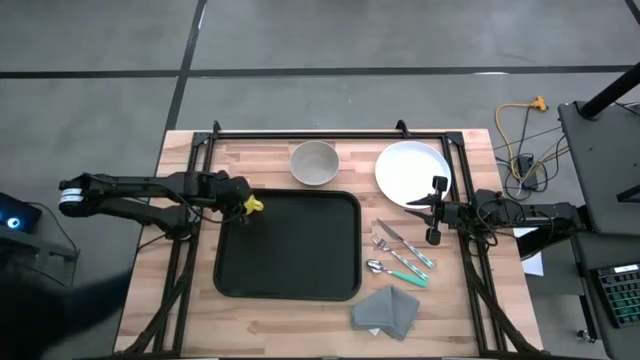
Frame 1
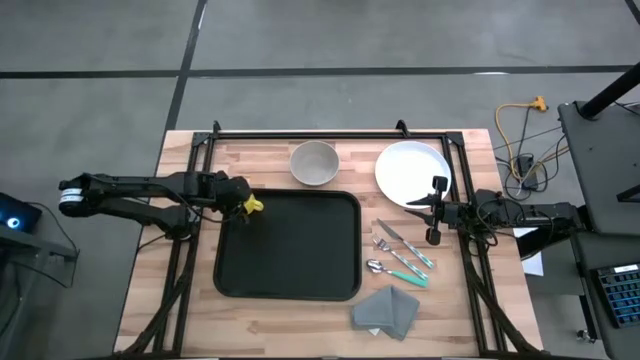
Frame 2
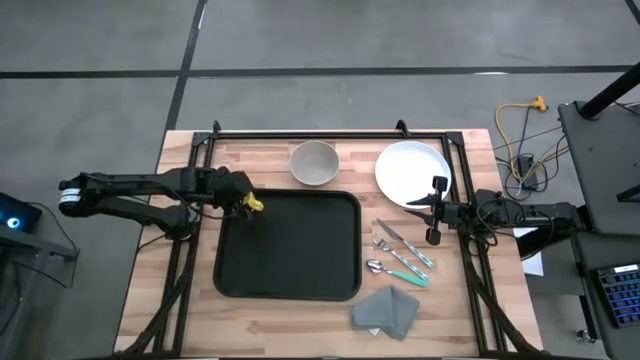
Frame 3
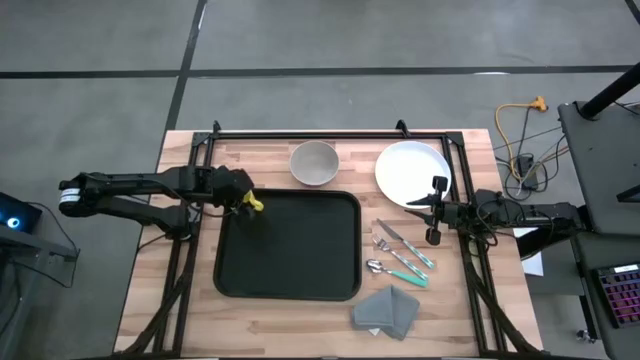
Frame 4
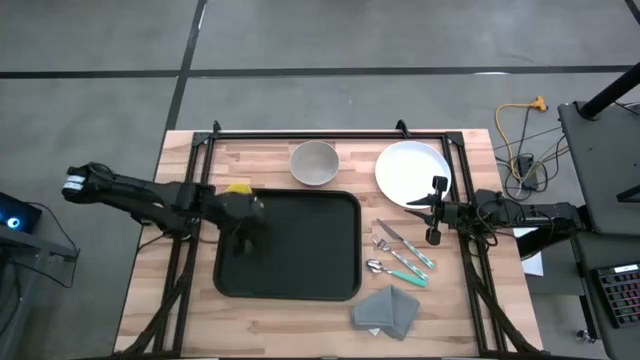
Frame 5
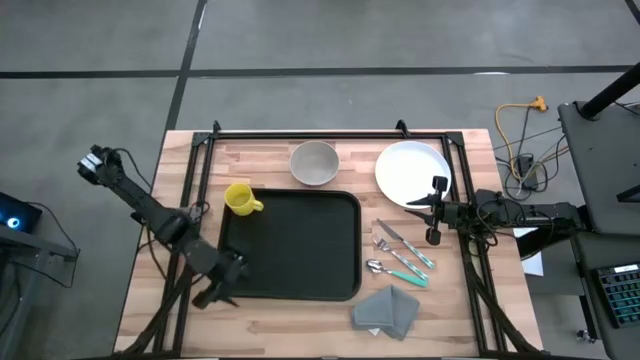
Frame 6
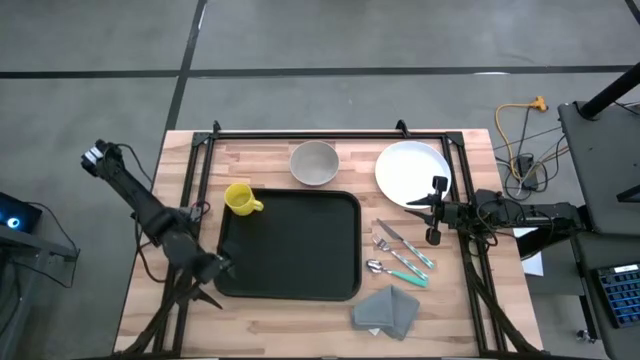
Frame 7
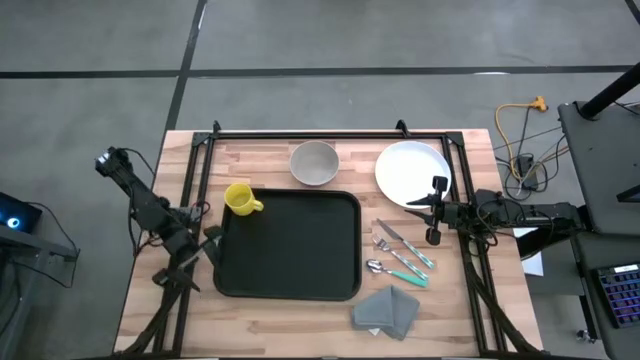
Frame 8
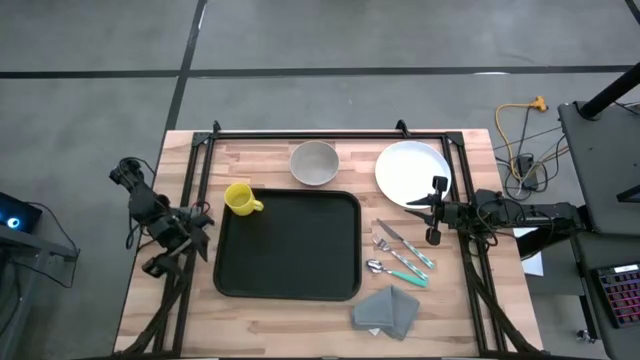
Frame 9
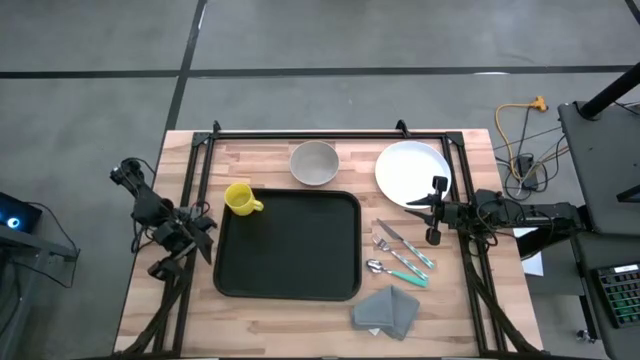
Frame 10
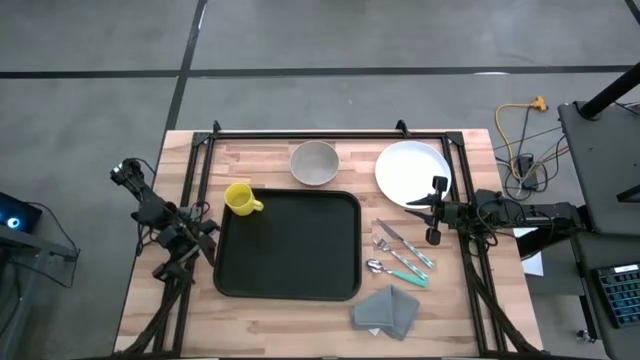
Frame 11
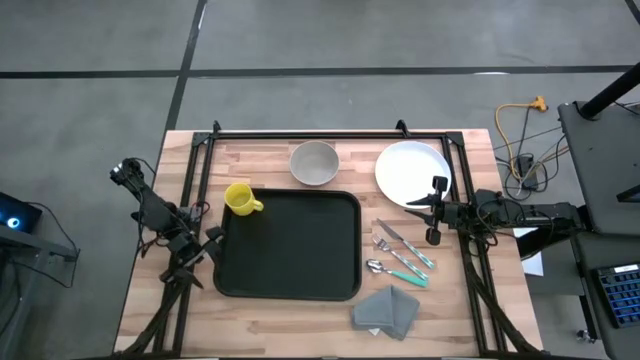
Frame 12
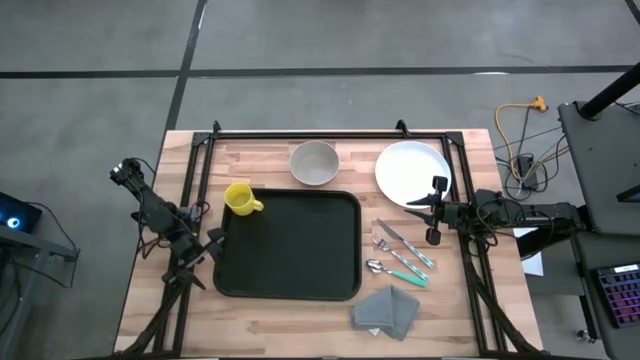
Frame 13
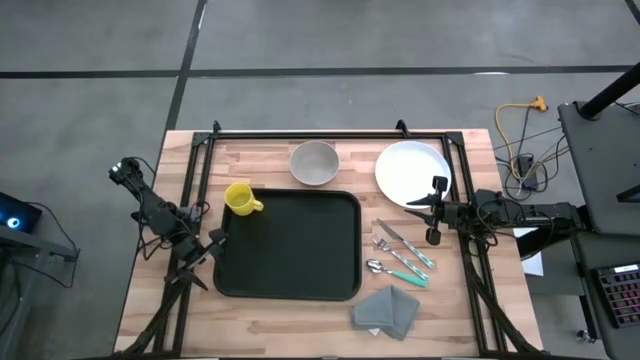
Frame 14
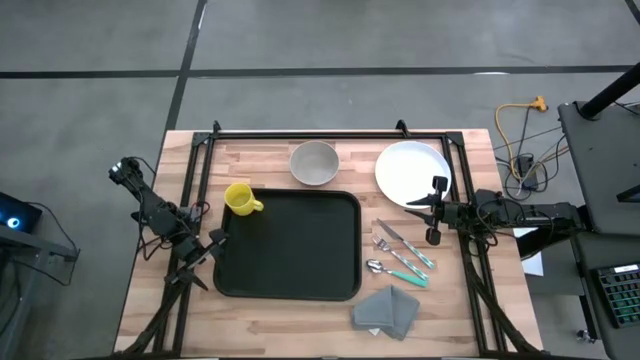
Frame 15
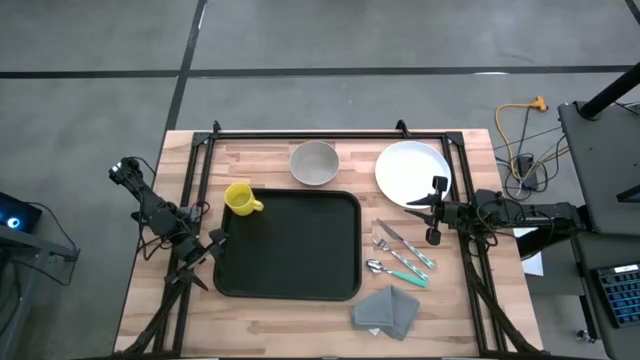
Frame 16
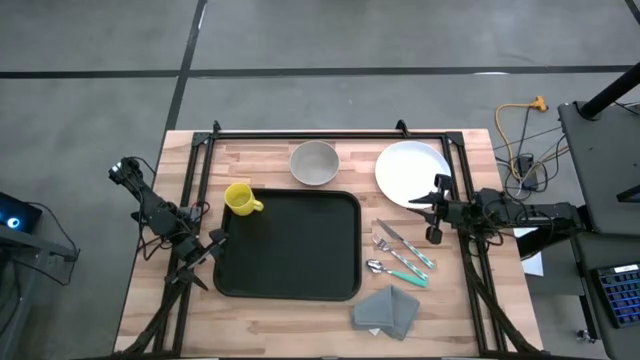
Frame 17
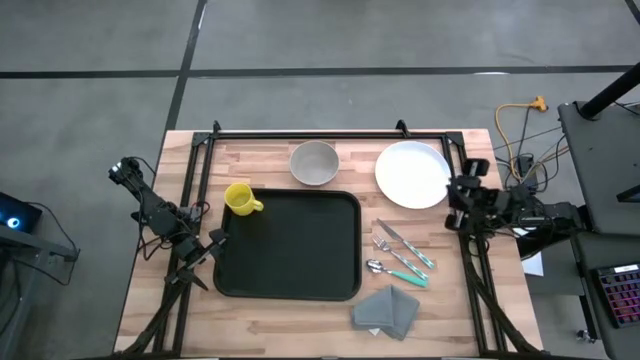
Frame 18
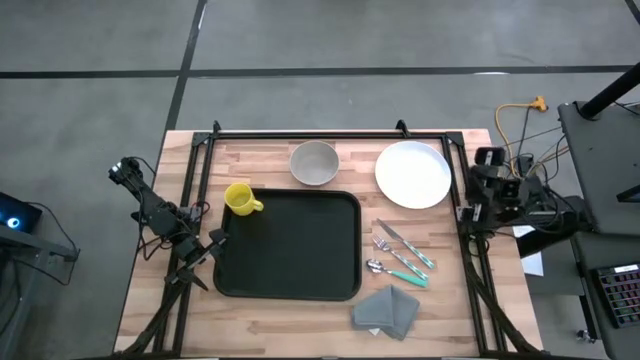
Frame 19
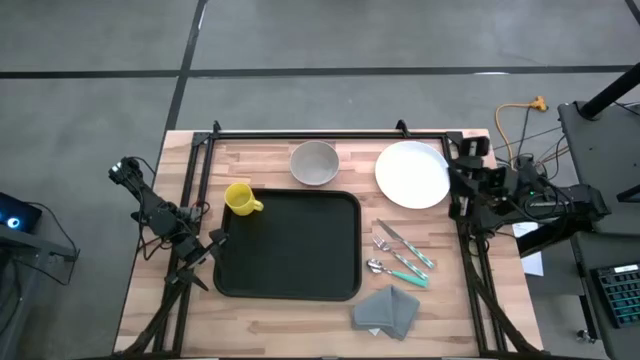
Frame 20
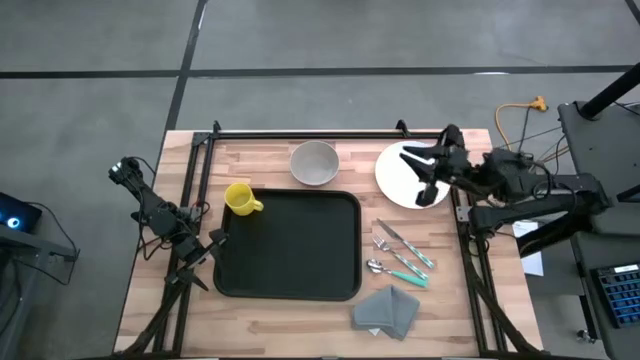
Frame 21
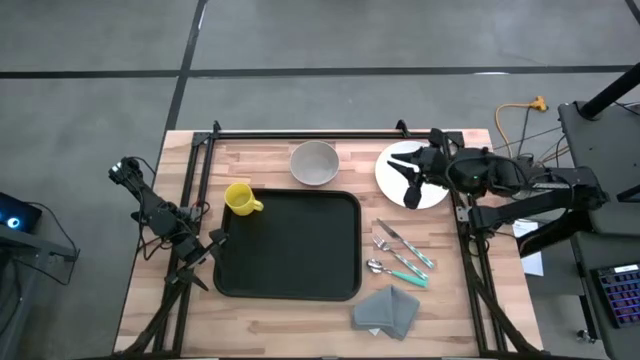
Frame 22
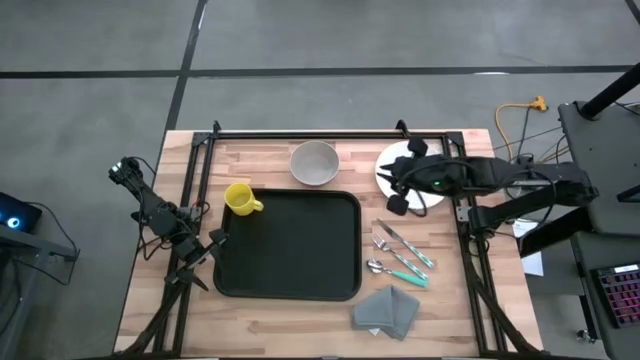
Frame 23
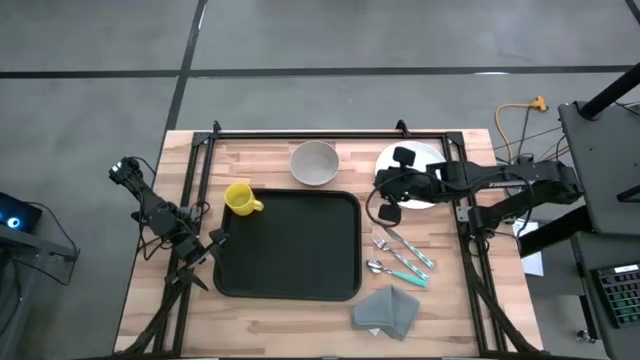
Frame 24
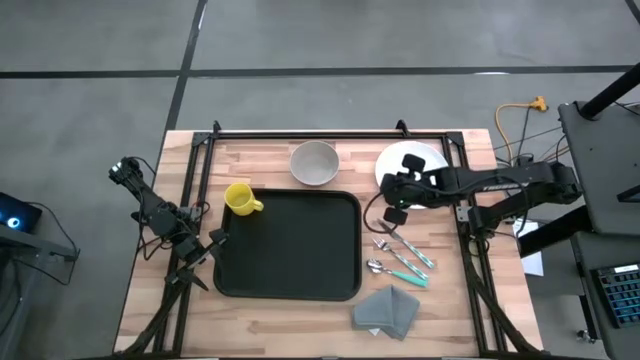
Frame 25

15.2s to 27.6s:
Task: Set up tray
Put the white plate on the black serving tray below the yellow cup

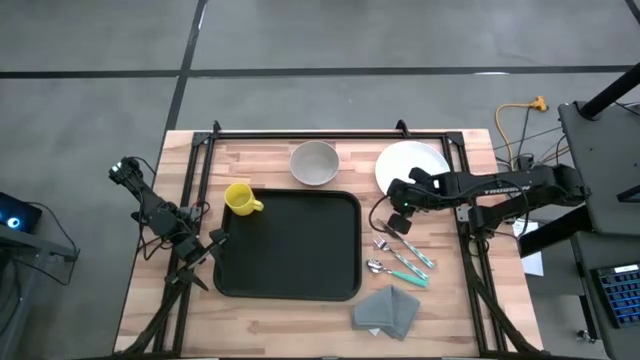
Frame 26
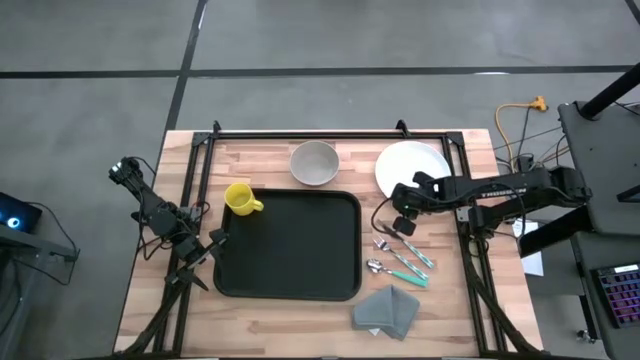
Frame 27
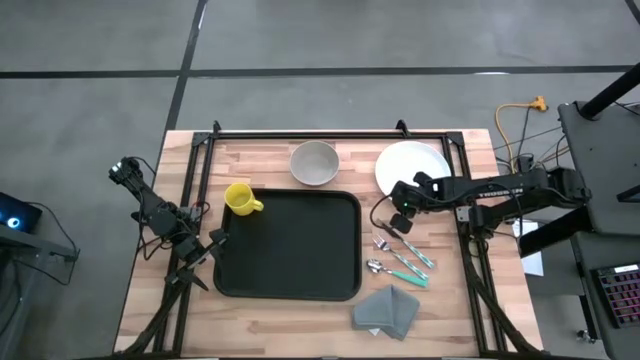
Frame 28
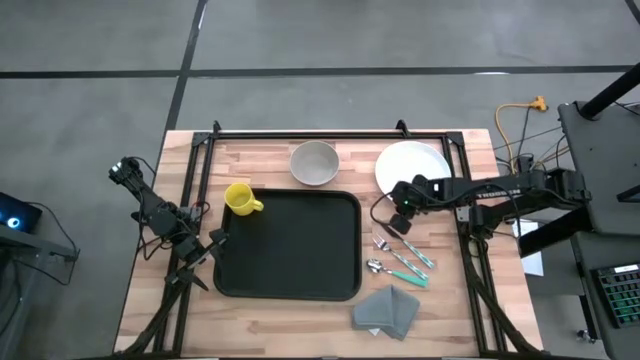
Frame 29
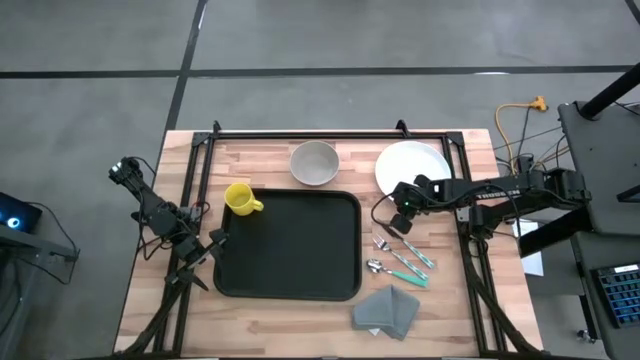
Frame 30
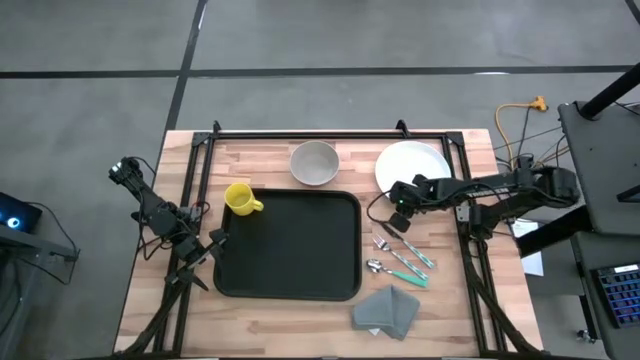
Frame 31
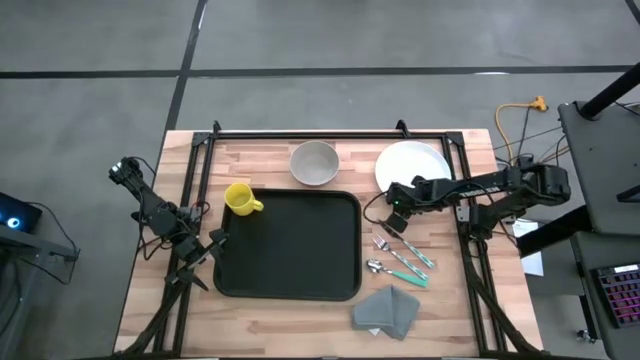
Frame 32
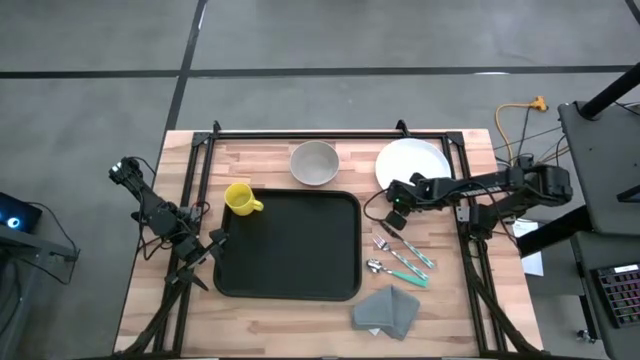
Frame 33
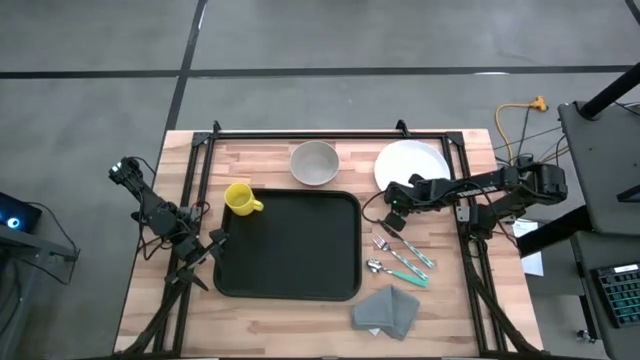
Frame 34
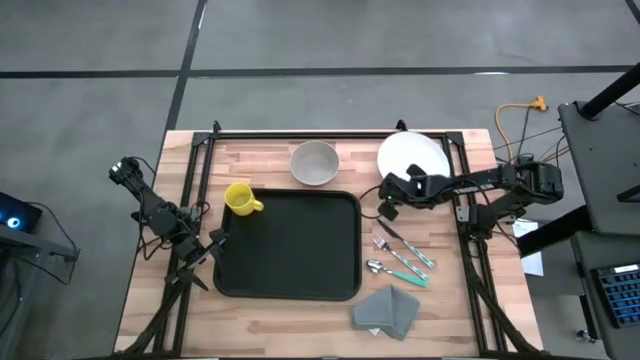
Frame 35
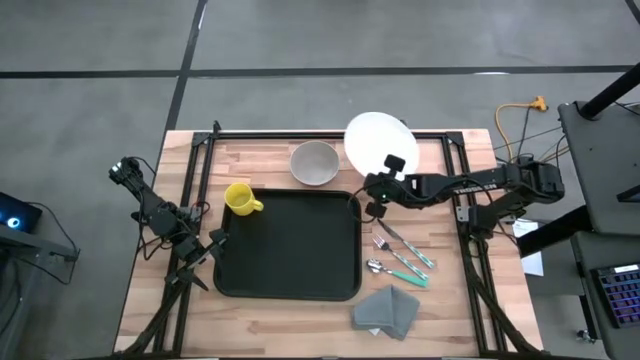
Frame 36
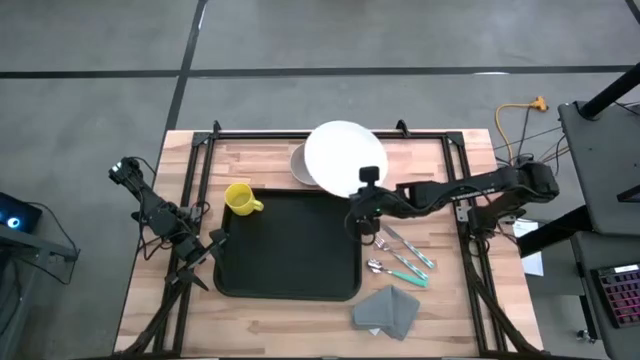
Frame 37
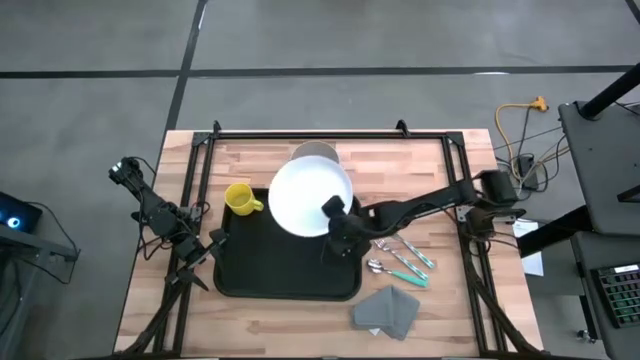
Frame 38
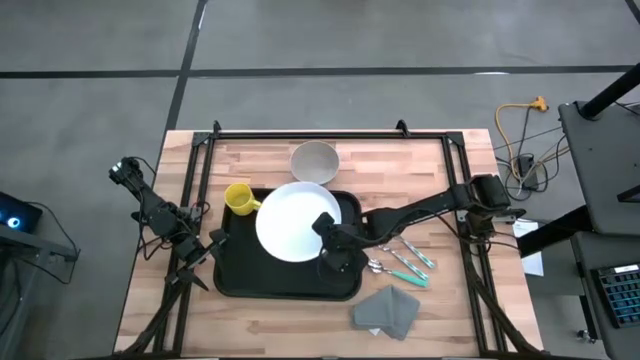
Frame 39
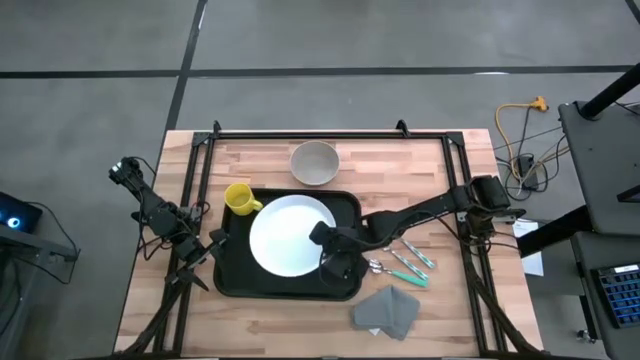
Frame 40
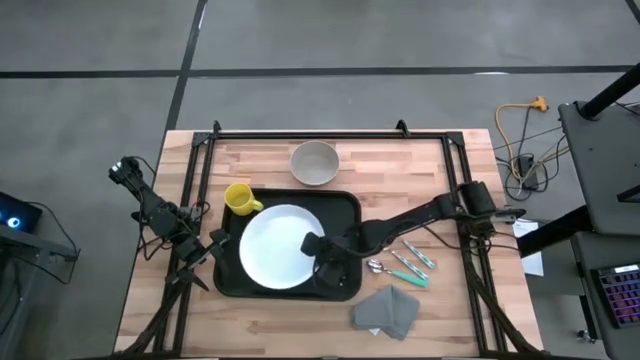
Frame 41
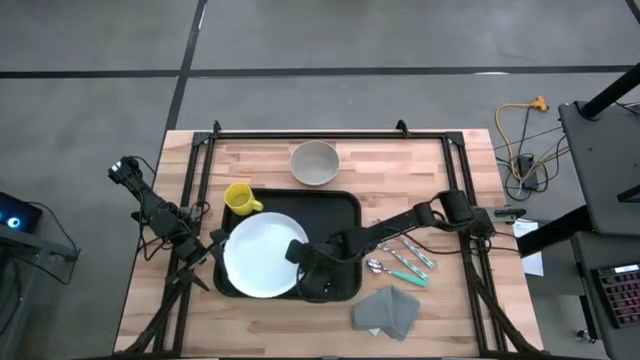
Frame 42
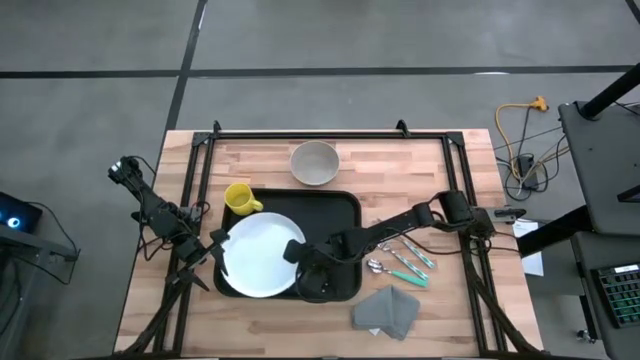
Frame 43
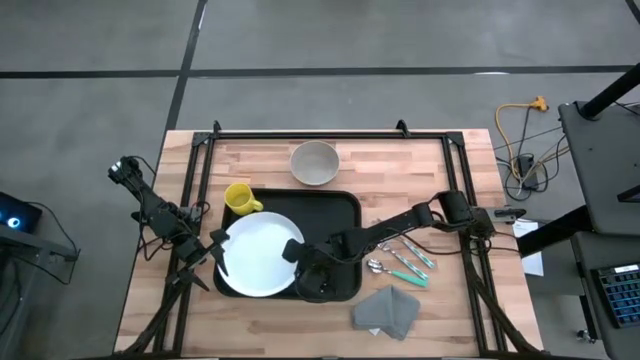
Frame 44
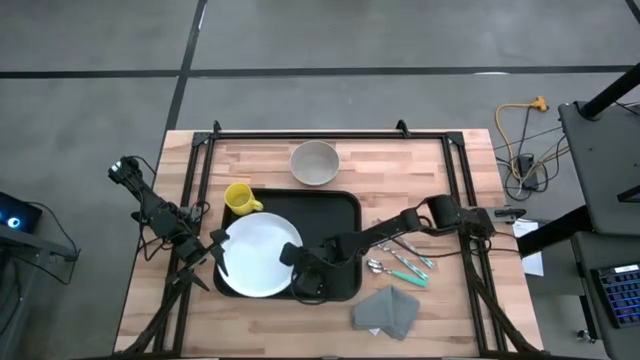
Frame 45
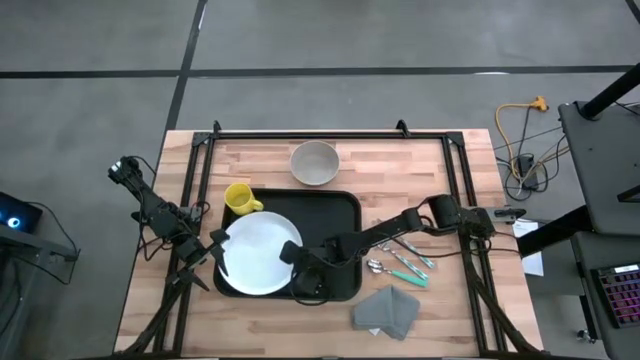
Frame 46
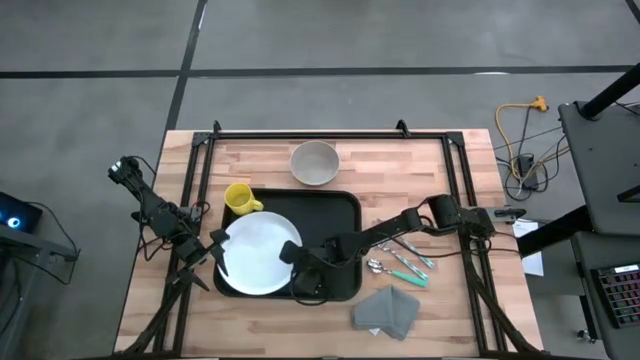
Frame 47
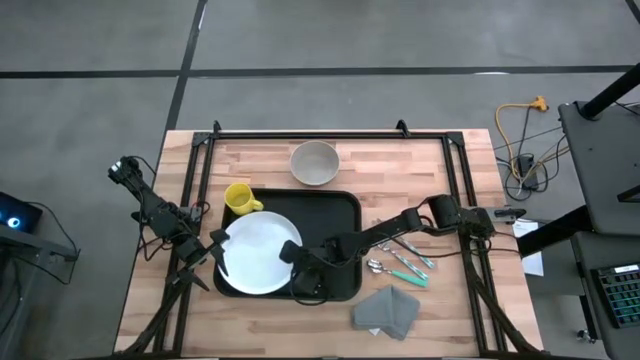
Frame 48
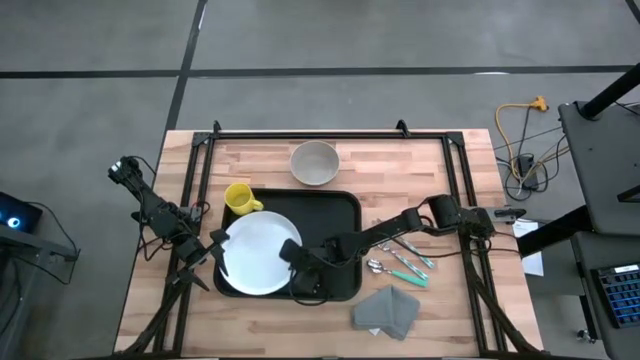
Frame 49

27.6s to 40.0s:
Put the white plate on the black serving tray below the yellow cup
